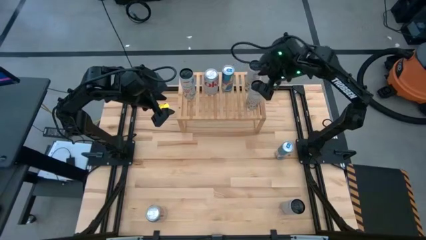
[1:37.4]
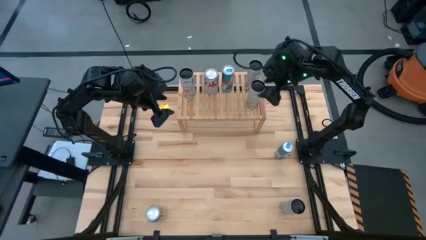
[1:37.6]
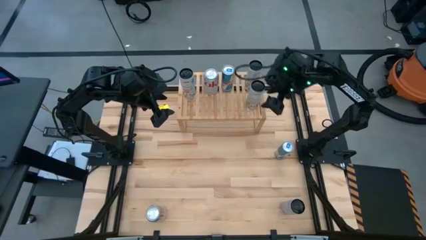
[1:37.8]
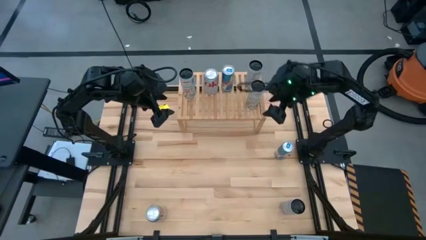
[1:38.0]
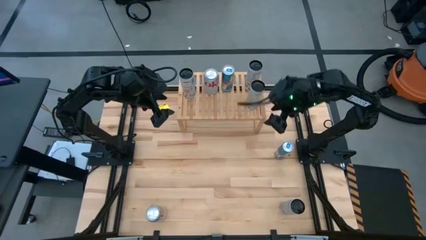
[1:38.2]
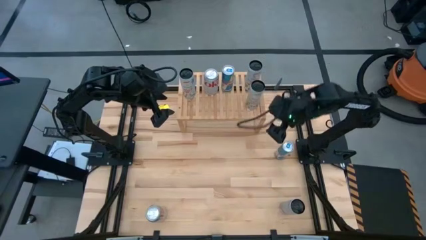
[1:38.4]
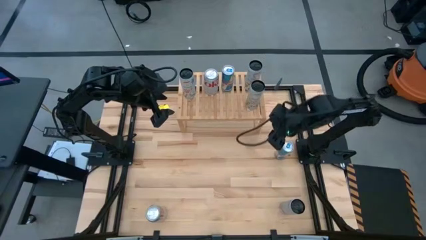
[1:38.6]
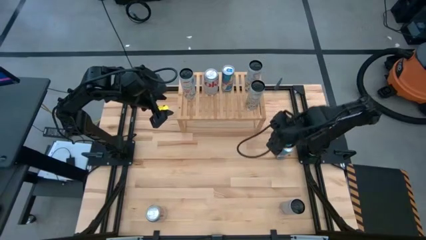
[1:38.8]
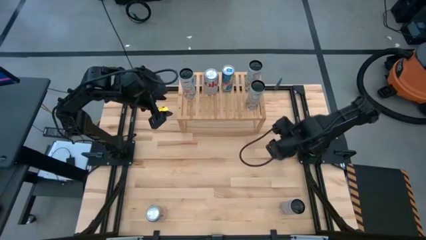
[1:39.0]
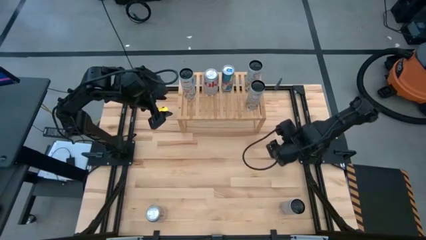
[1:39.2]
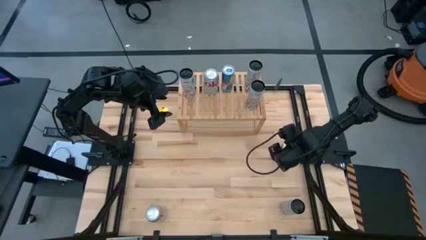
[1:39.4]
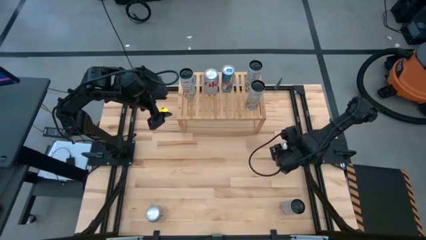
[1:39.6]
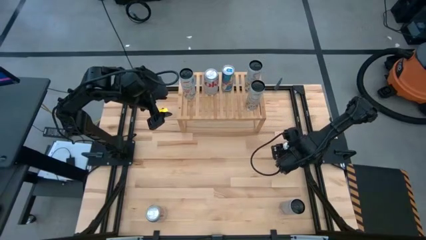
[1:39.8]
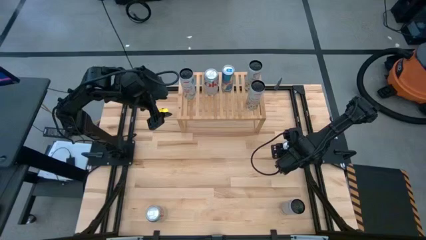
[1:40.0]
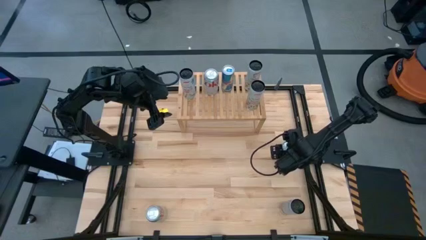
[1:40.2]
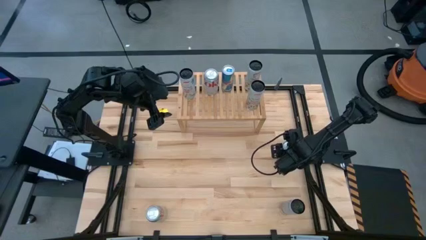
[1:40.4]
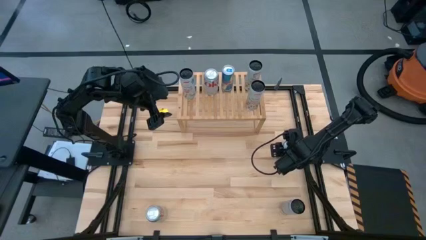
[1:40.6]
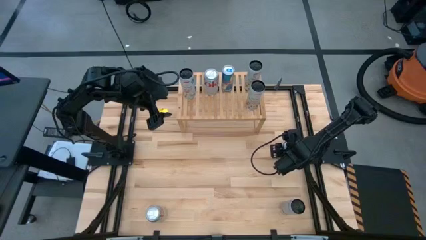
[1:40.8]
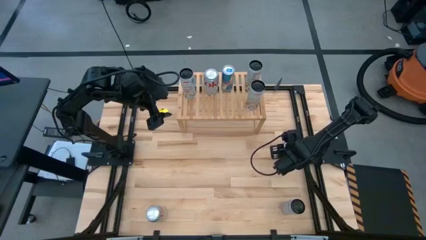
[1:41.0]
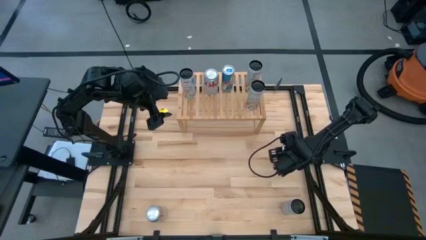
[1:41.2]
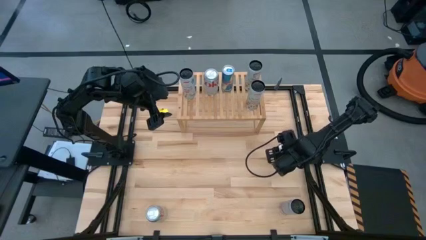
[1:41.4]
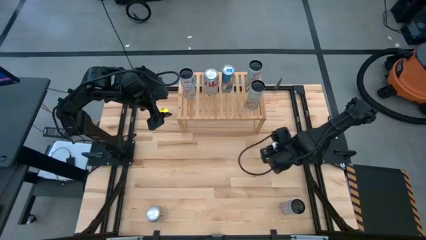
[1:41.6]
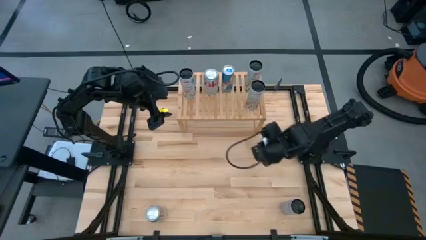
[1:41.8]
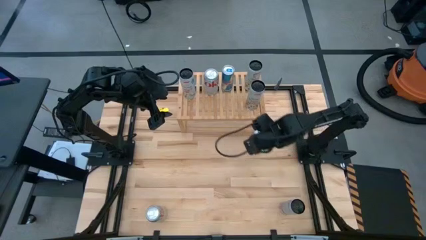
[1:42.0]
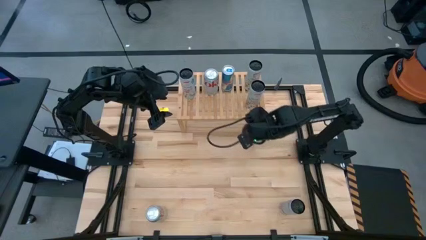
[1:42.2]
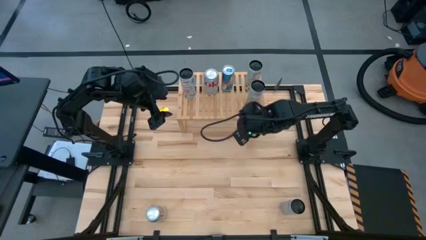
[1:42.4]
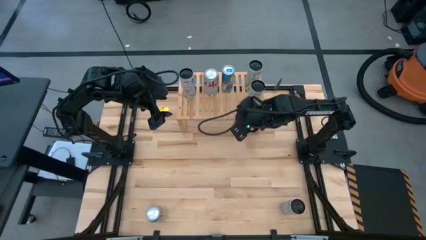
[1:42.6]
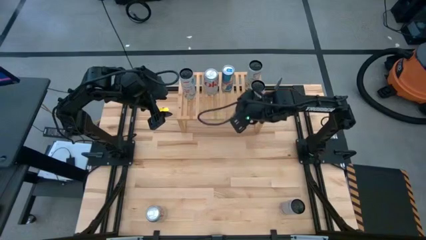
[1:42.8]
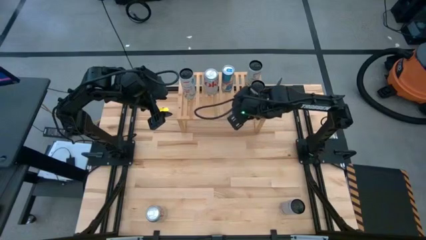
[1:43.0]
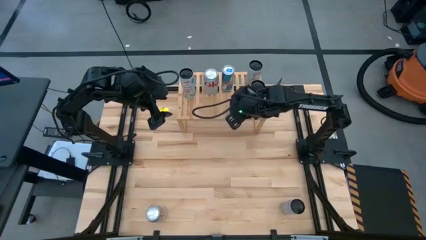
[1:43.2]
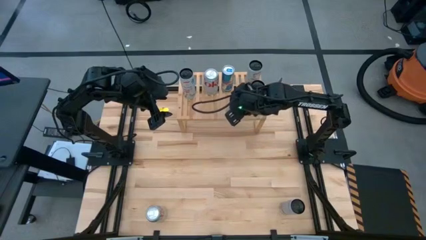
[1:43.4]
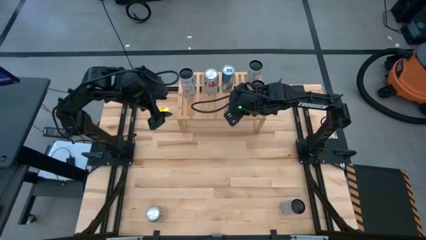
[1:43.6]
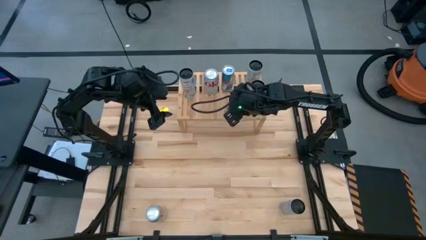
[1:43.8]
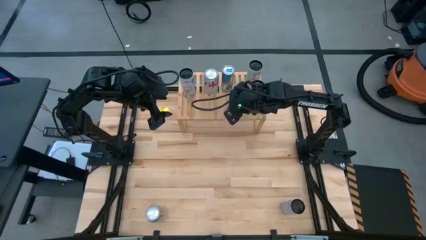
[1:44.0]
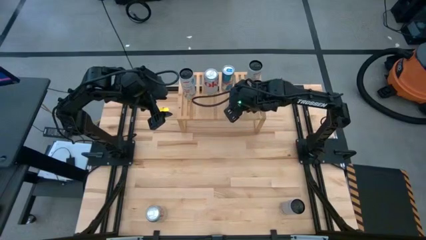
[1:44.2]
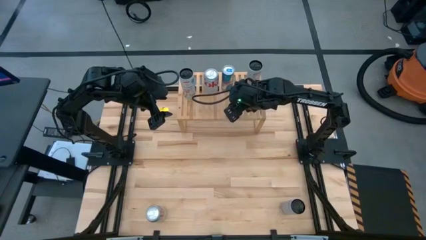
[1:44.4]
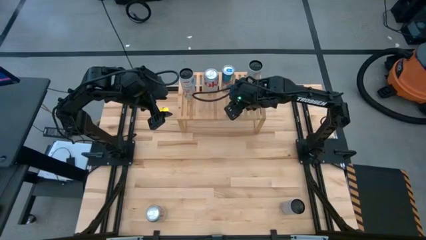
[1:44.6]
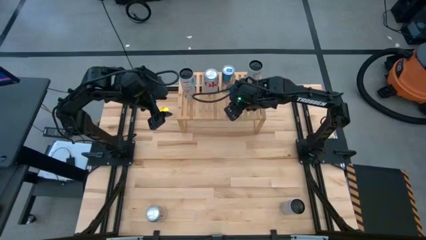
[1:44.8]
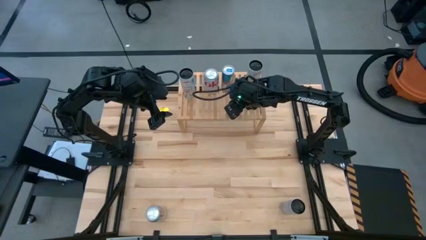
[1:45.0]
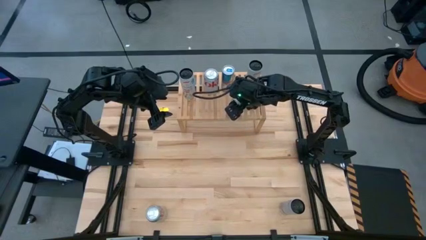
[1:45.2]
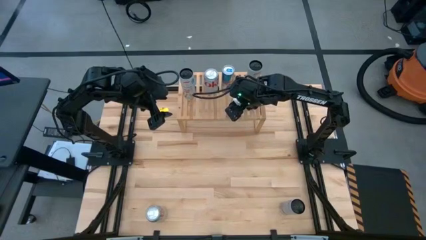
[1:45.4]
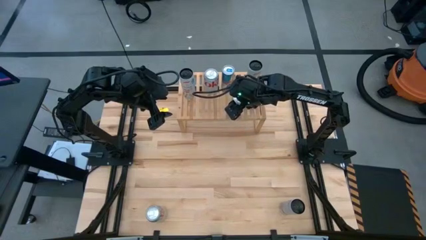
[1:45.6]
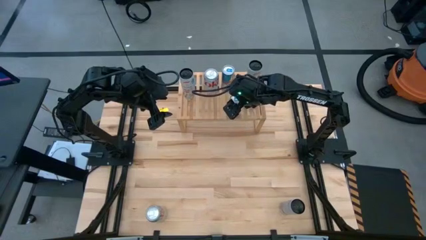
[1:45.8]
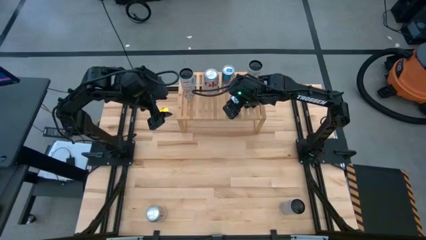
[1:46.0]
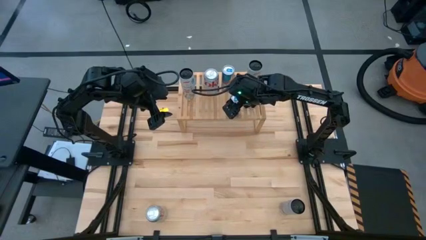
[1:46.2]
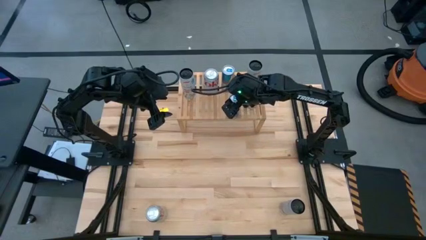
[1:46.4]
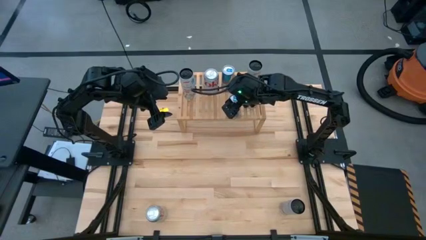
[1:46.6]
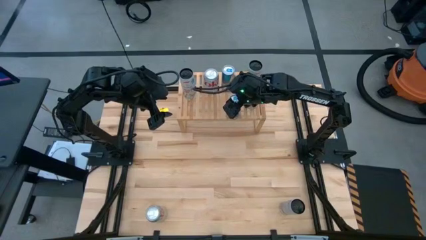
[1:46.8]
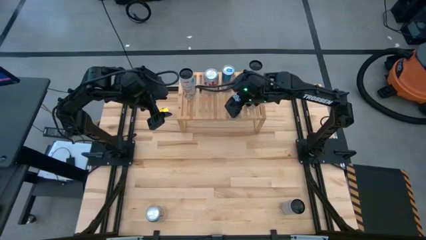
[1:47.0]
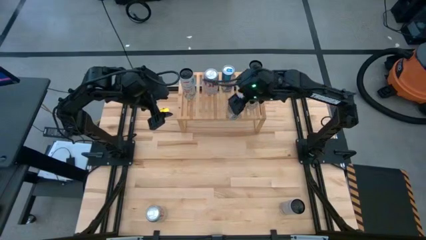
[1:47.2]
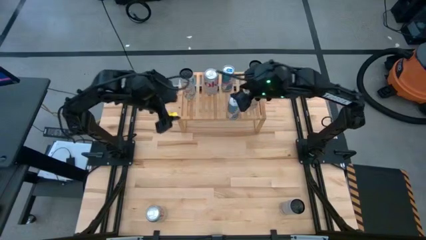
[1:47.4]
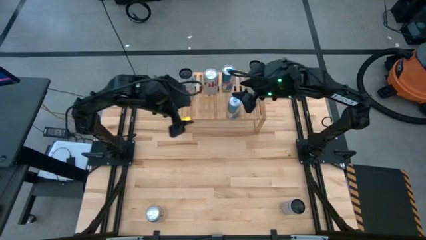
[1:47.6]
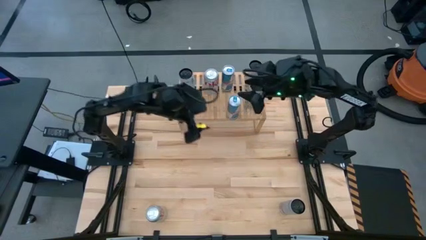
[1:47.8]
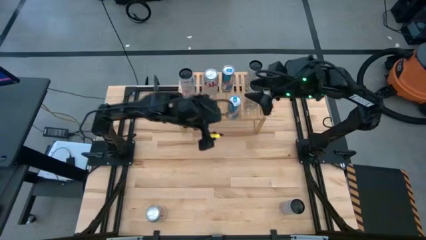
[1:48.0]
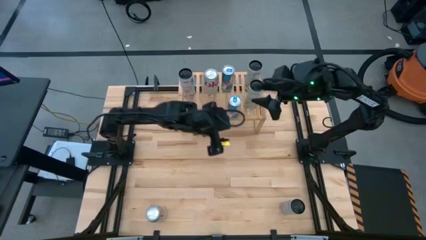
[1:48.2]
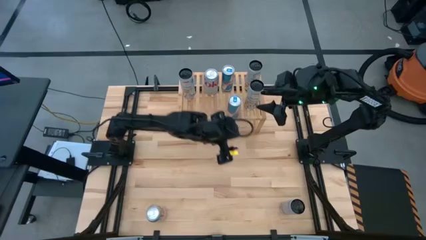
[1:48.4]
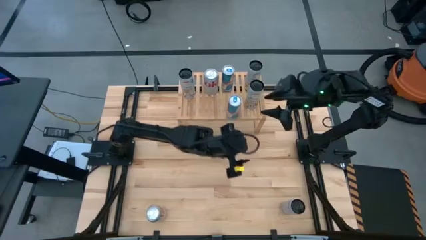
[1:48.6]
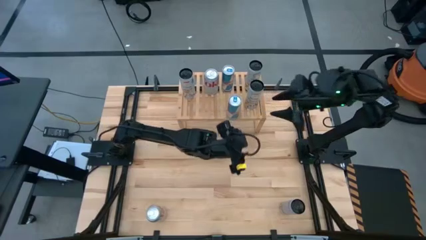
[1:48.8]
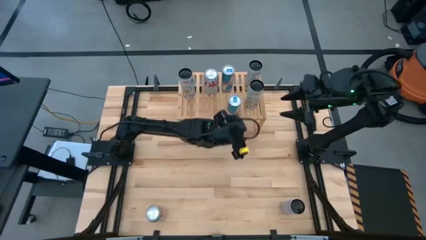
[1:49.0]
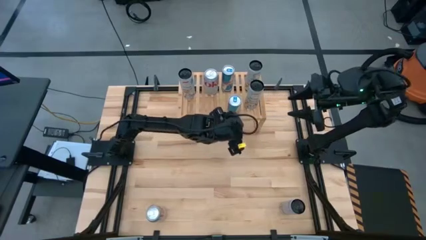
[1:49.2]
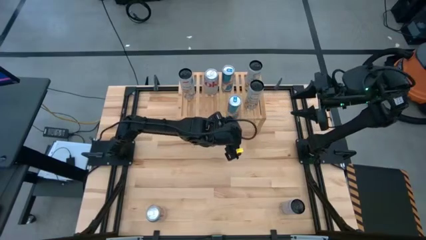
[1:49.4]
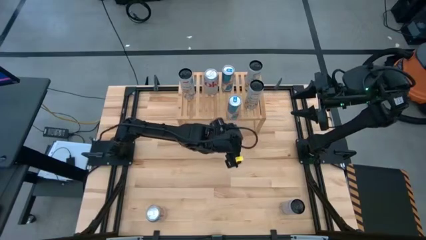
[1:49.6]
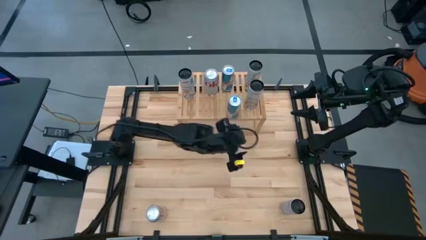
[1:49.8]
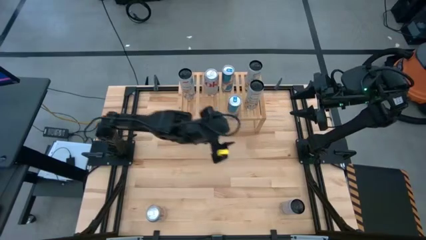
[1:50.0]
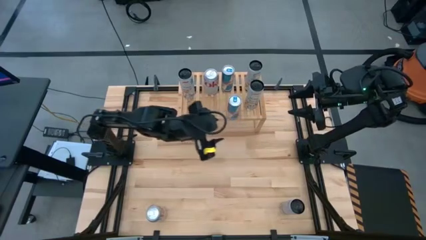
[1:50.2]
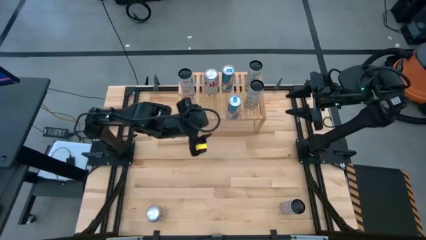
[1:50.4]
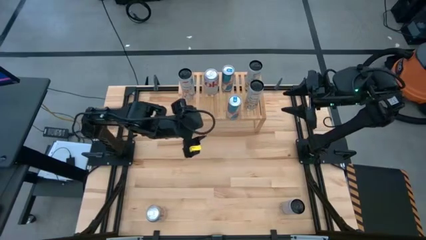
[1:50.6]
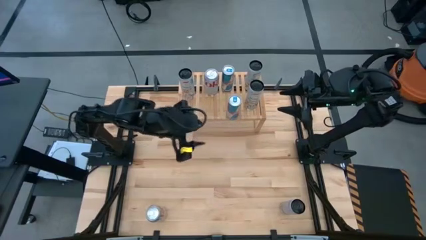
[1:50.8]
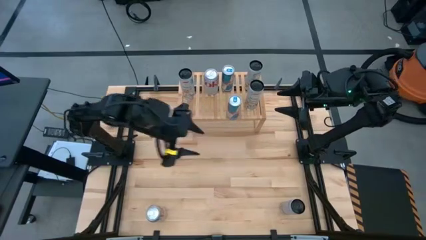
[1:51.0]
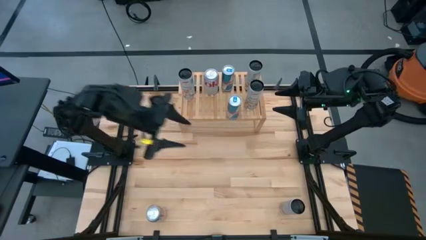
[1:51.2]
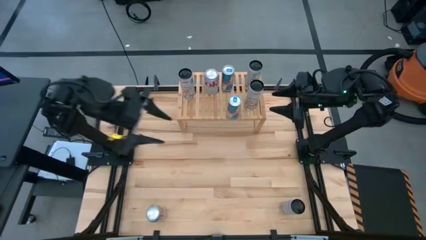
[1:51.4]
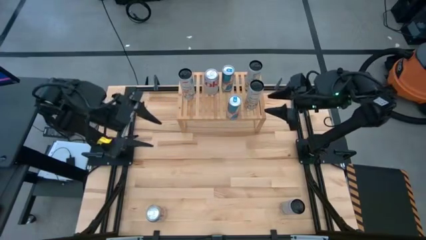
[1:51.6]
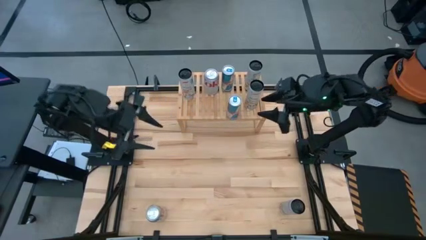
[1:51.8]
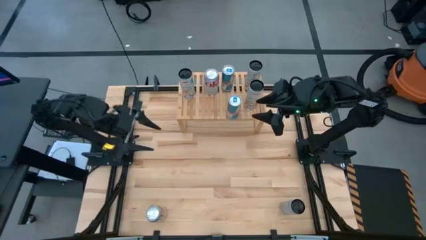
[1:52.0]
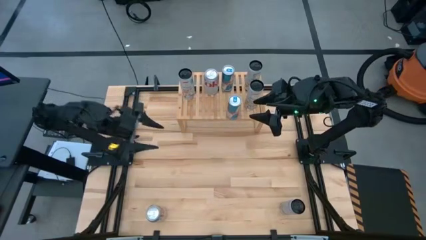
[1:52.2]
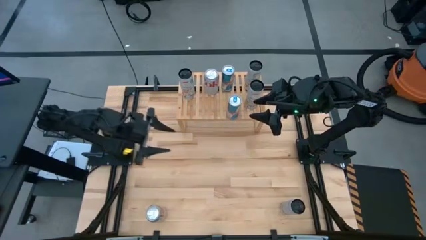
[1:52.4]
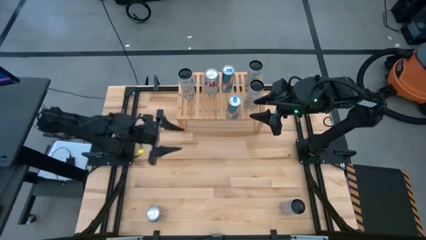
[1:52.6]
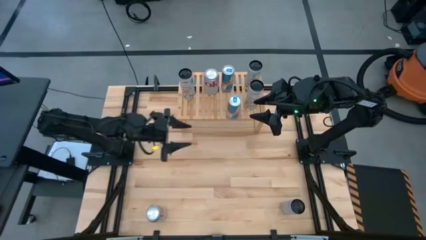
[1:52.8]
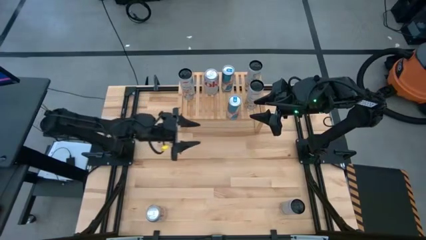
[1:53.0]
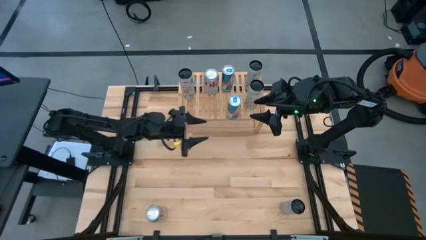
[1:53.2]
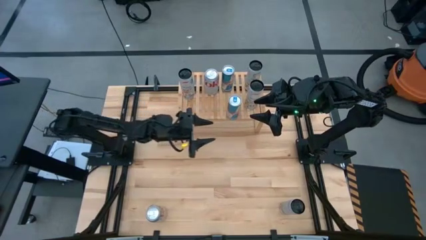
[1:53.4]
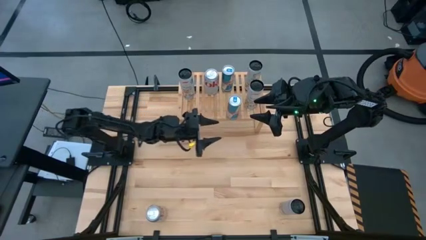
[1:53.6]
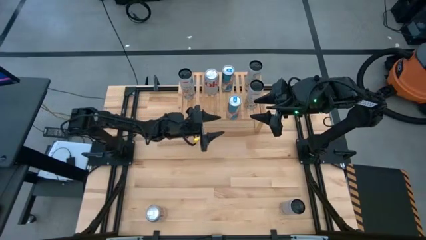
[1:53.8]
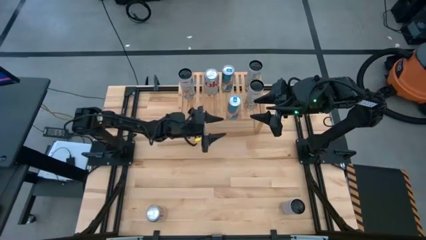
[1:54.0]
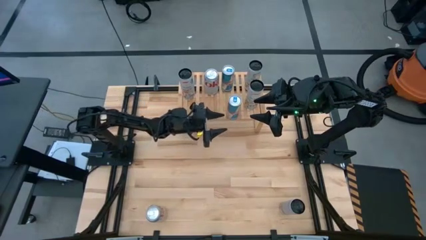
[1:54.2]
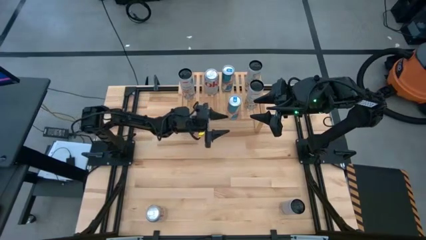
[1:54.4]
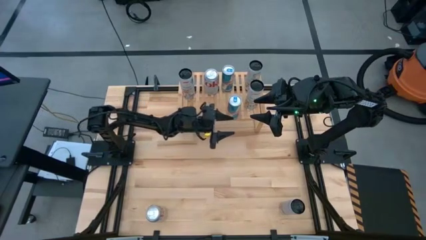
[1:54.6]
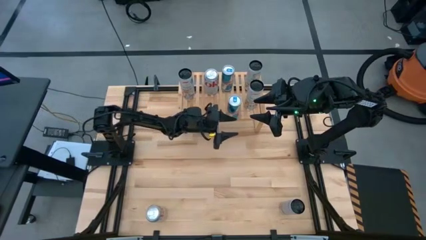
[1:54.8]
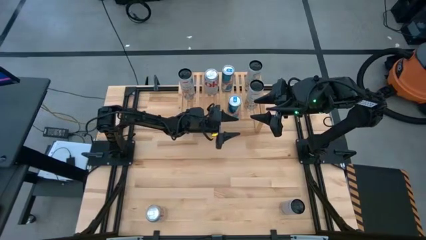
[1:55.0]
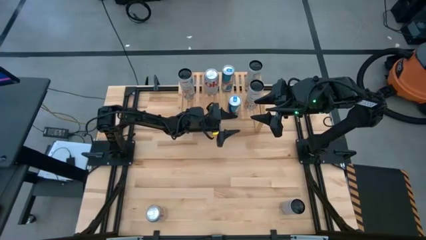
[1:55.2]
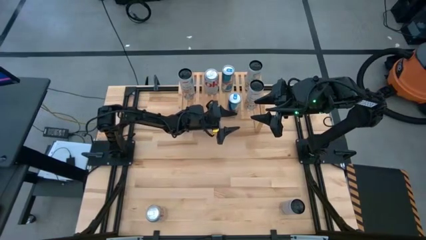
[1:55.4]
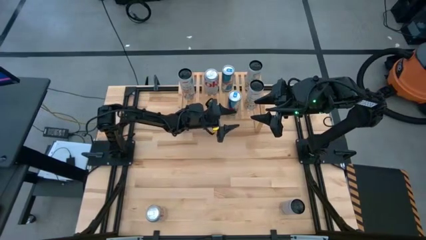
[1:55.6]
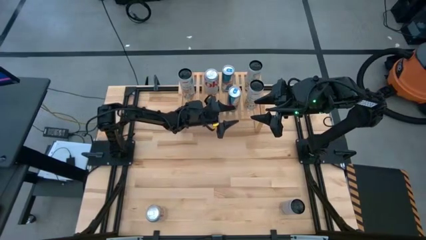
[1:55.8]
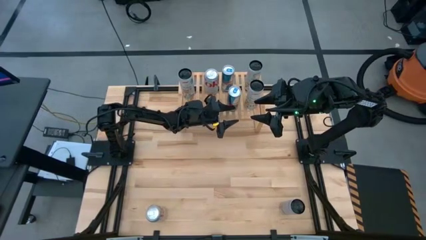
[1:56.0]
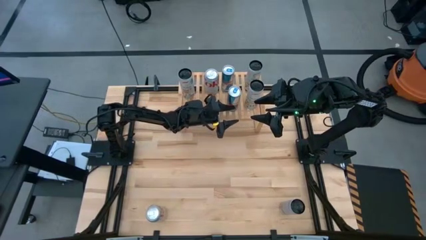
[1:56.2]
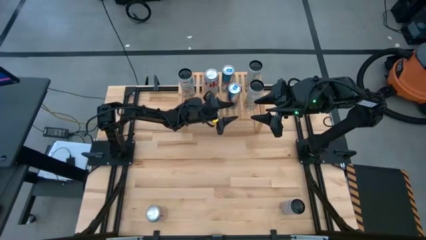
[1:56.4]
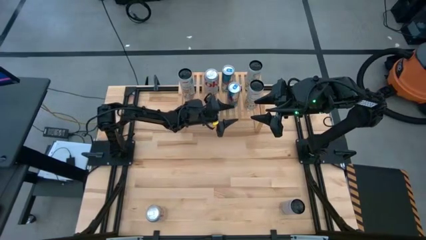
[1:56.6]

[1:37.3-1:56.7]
Task: Place canned beverage on shelf
Put the blue soda can on the shelf aligned with the other blue soda can
